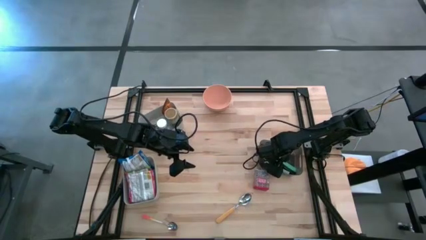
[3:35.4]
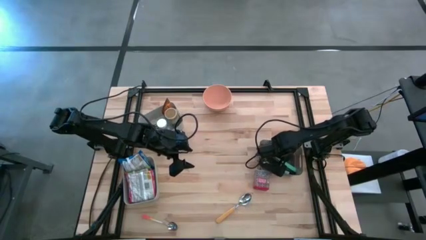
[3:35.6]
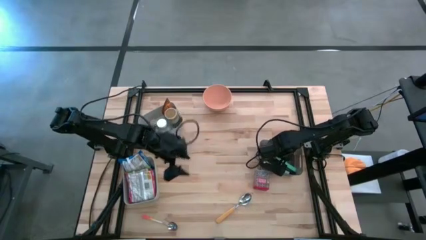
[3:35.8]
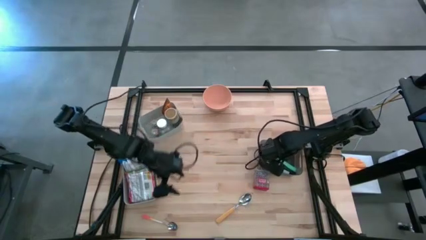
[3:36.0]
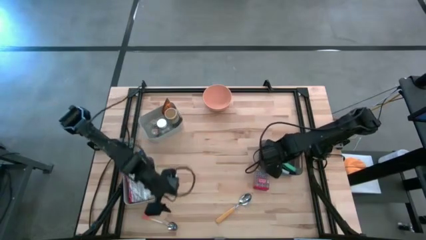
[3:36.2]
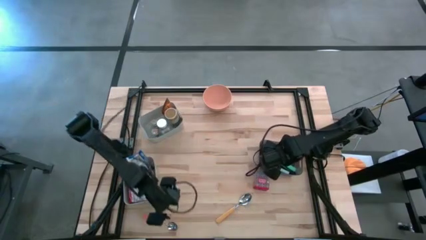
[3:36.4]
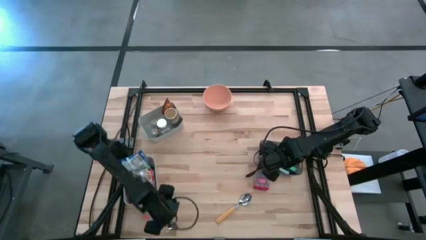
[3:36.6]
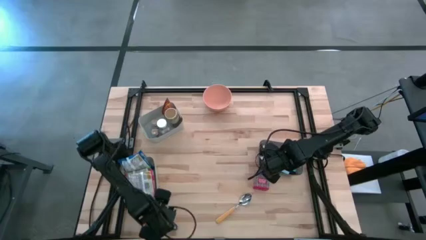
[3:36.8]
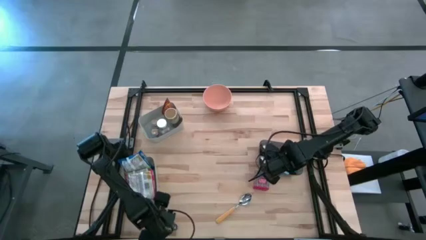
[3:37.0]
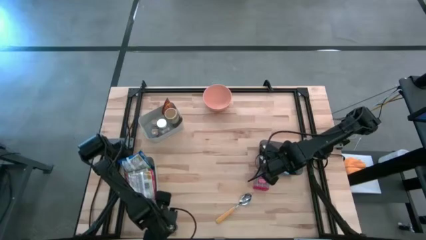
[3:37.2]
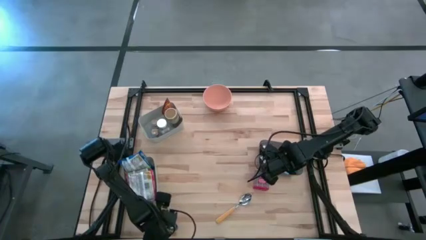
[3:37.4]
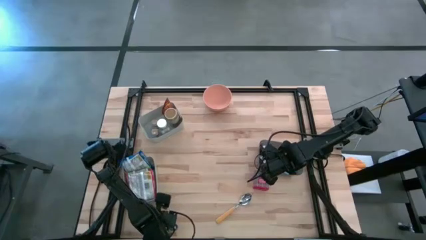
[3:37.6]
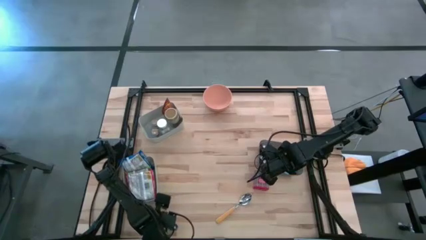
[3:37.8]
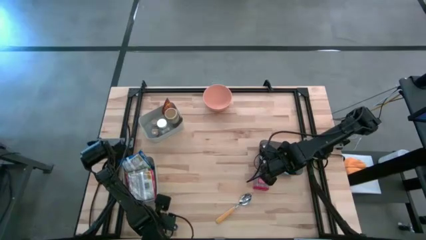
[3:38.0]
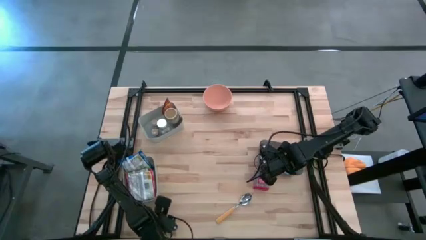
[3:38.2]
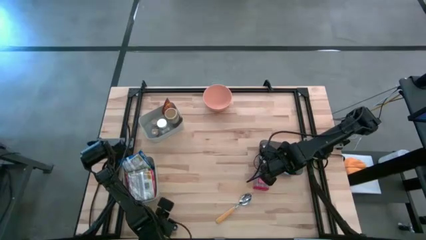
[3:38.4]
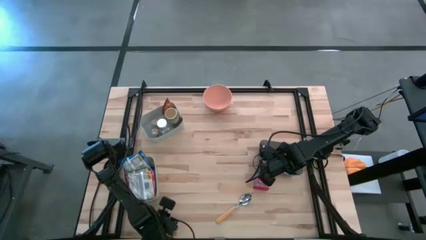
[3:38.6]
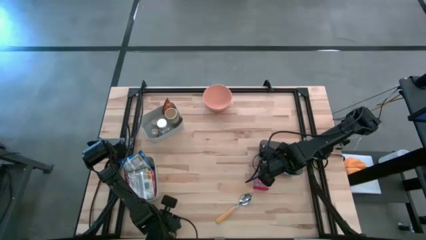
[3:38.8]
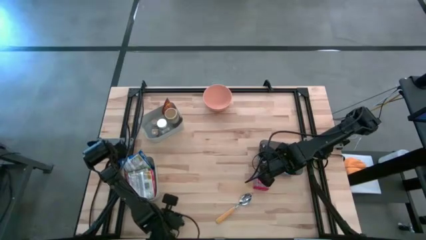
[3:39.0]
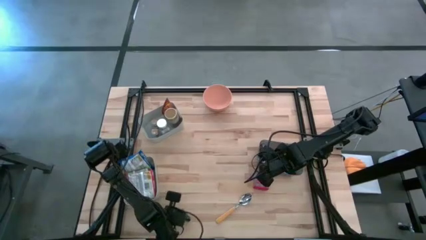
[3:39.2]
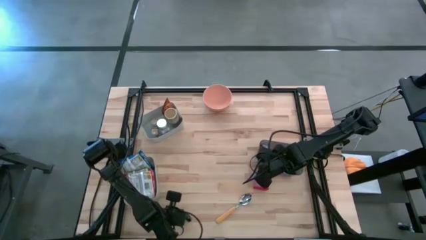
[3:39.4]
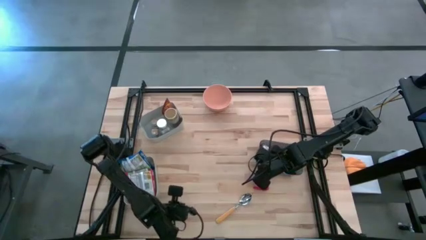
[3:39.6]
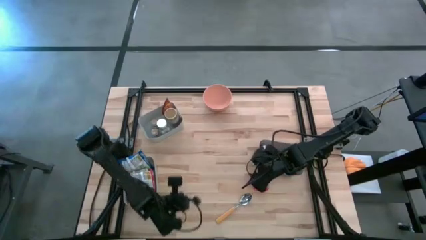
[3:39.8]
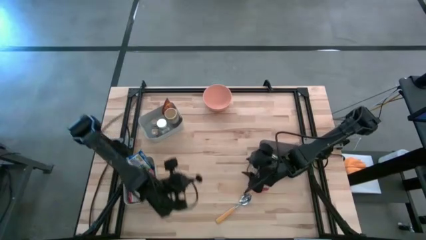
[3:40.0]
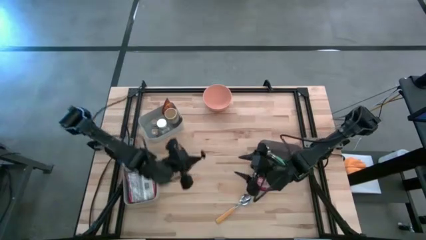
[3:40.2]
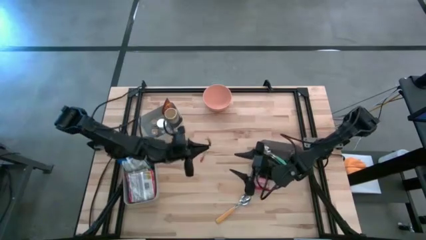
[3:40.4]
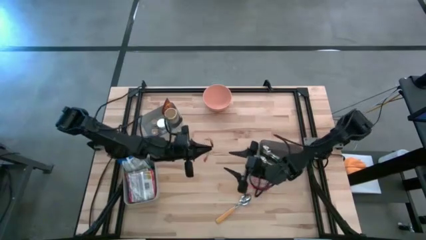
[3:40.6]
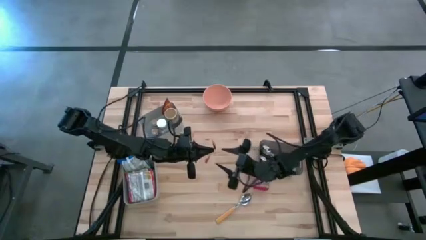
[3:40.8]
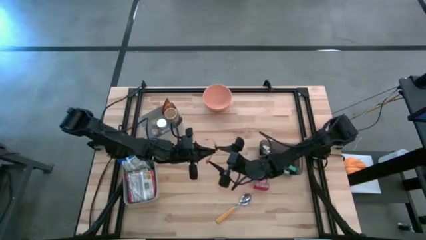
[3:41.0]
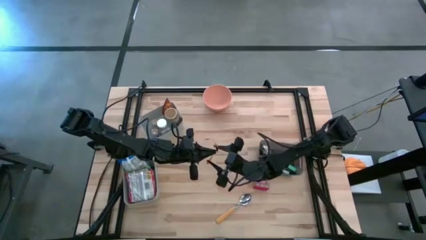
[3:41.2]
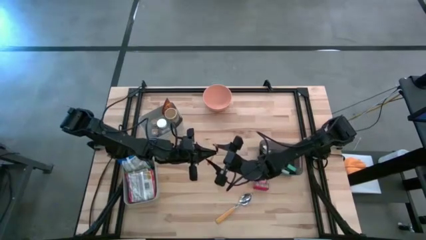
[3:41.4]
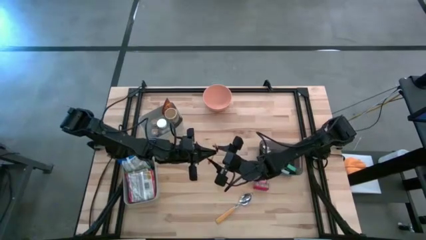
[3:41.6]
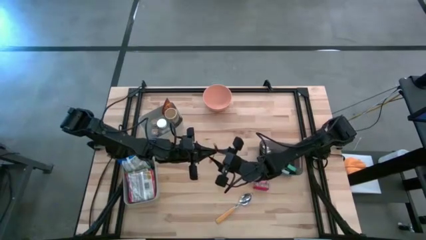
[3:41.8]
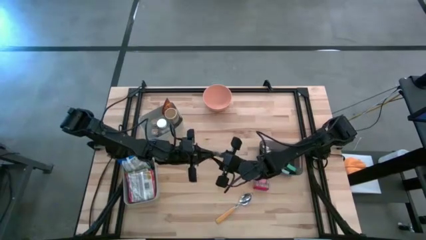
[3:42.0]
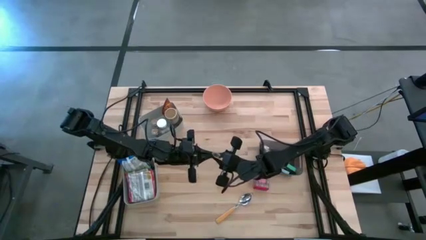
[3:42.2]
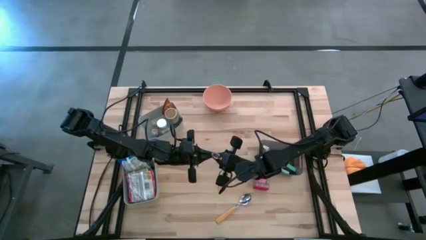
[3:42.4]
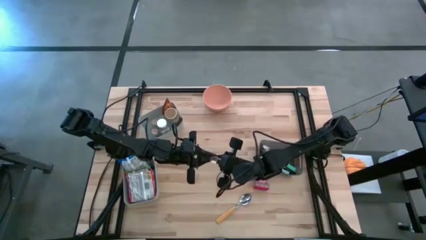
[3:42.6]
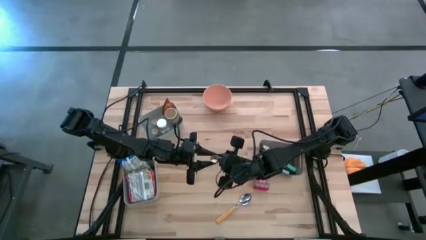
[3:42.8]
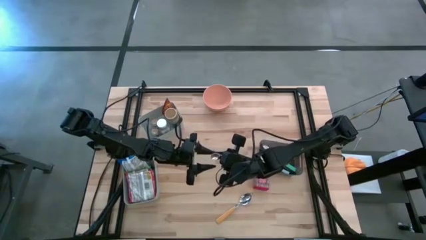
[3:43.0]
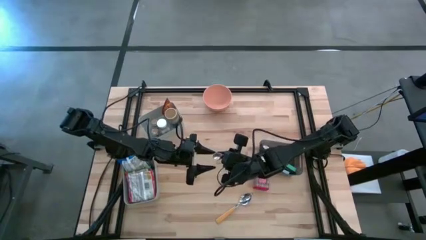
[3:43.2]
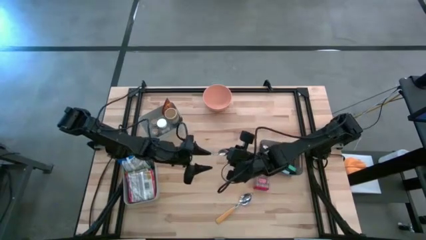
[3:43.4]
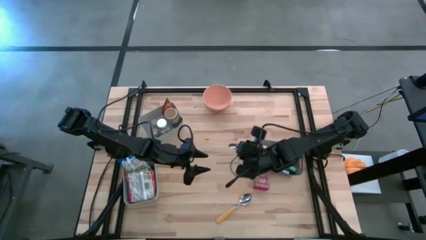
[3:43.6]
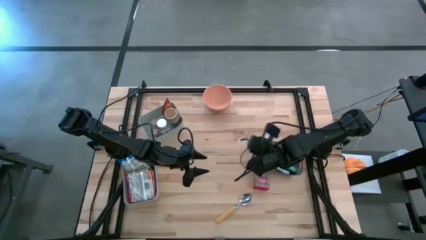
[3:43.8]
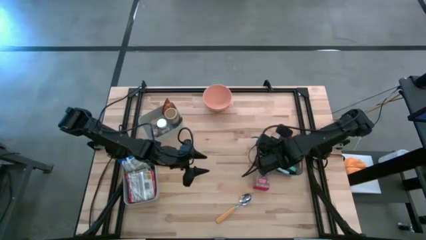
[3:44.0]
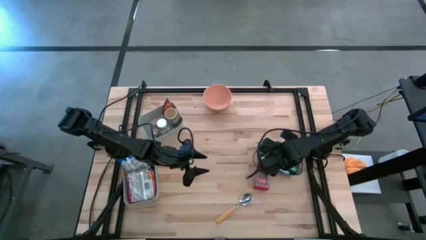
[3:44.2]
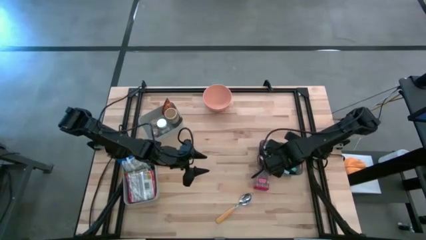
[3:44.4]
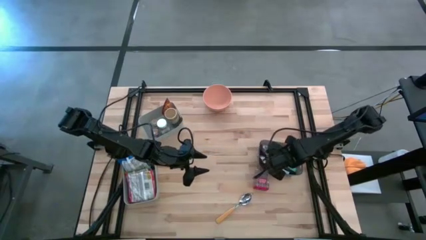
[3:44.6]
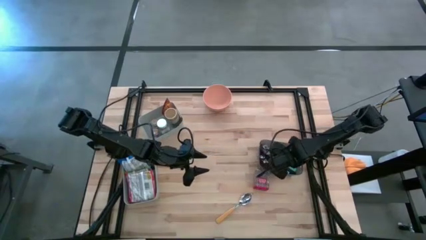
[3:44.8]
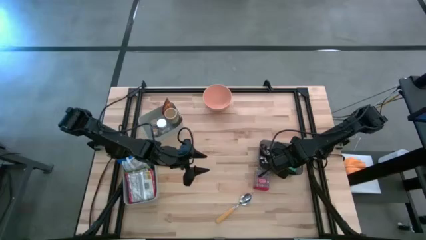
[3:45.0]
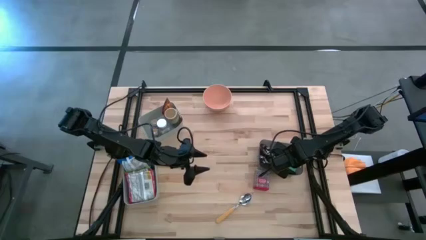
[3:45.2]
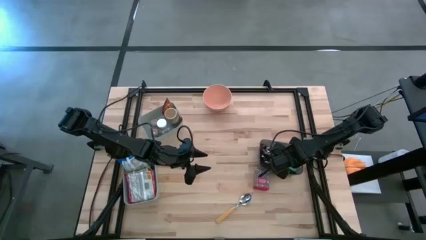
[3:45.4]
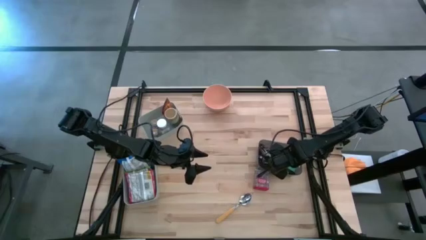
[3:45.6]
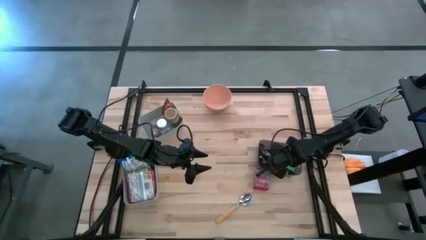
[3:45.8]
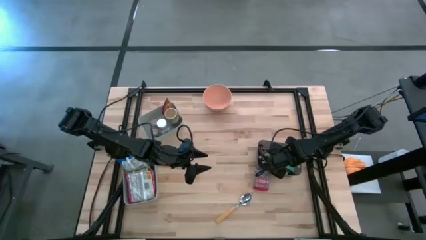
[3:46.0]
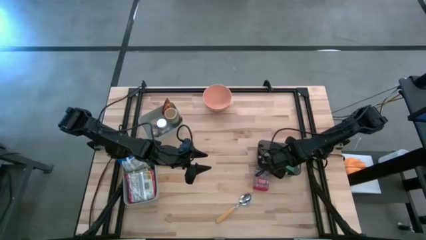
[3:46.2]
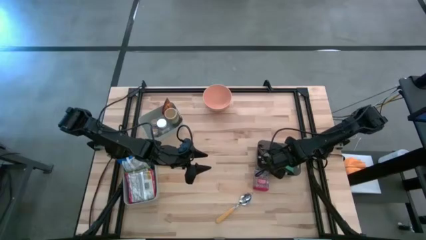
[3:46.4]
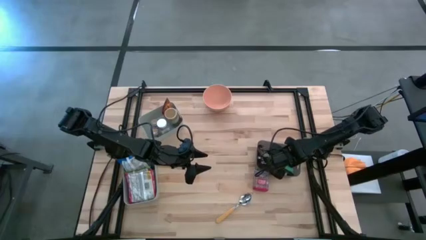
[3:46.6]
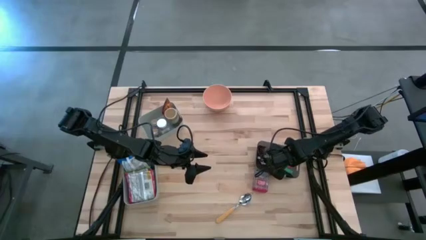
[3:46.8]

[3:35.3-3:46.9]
Put the white orange spoon into the black bin

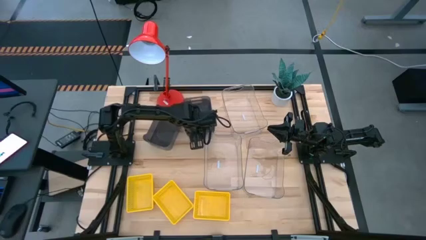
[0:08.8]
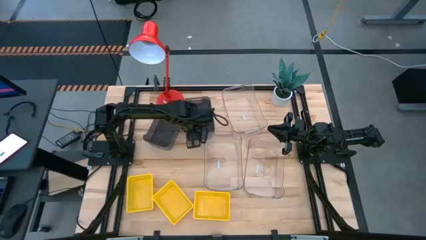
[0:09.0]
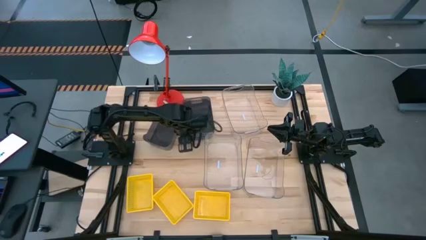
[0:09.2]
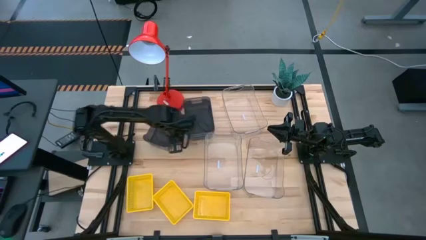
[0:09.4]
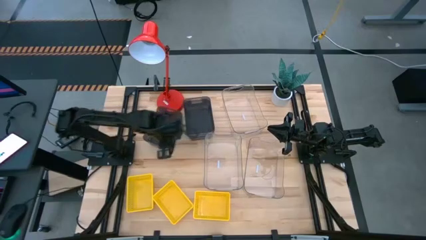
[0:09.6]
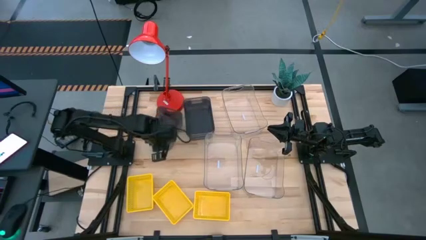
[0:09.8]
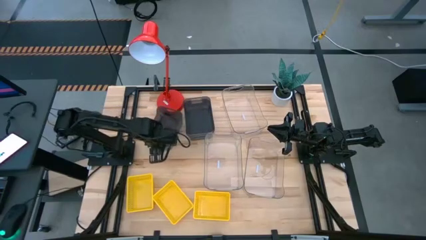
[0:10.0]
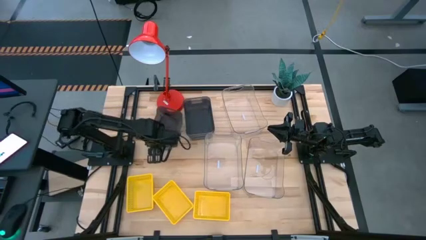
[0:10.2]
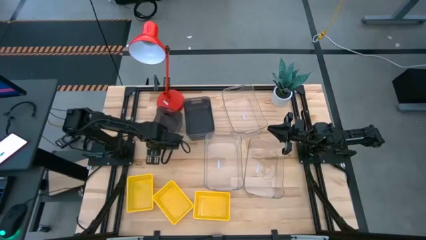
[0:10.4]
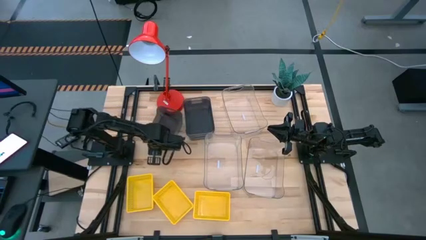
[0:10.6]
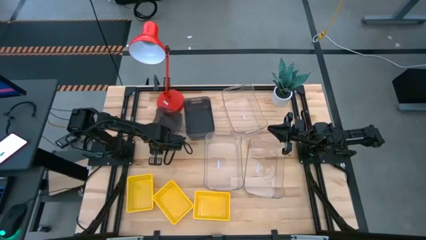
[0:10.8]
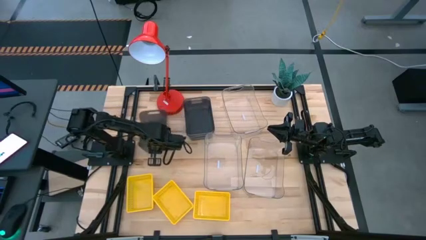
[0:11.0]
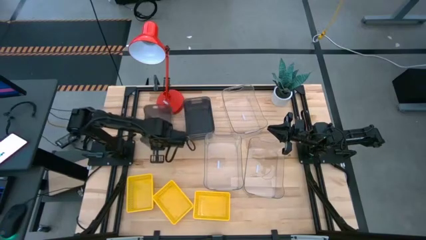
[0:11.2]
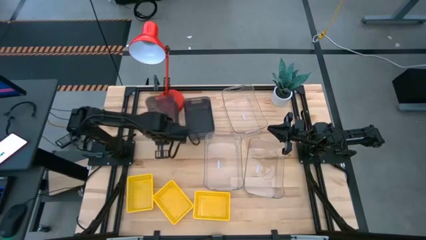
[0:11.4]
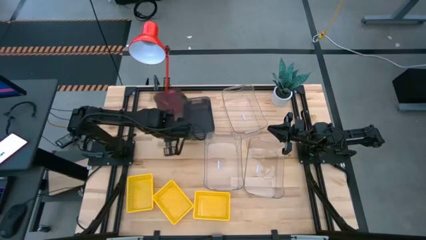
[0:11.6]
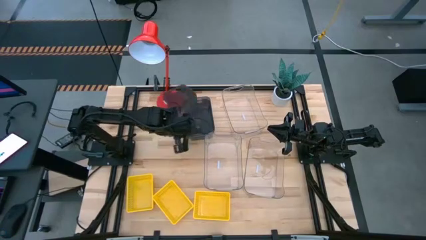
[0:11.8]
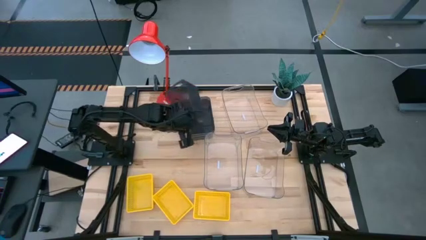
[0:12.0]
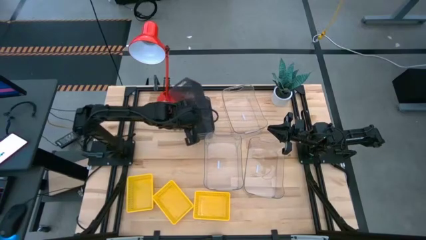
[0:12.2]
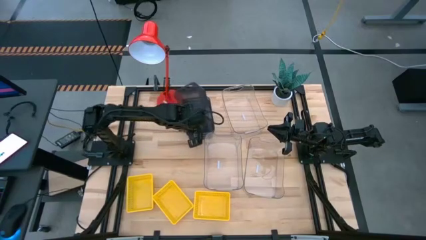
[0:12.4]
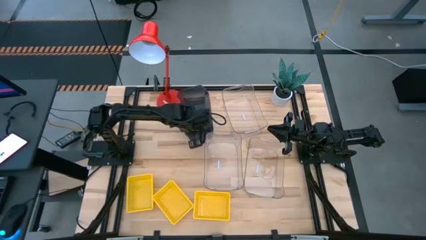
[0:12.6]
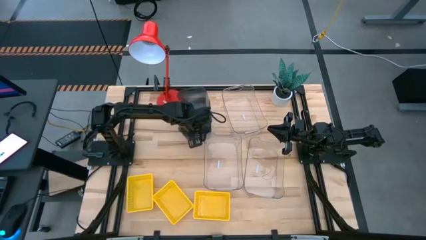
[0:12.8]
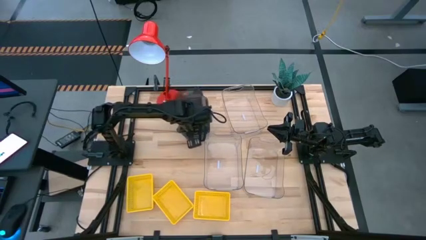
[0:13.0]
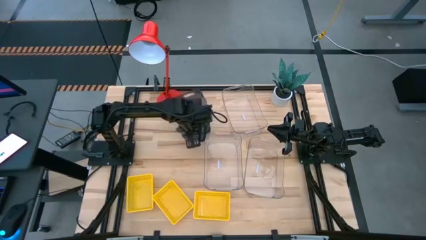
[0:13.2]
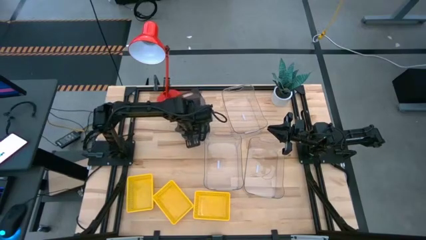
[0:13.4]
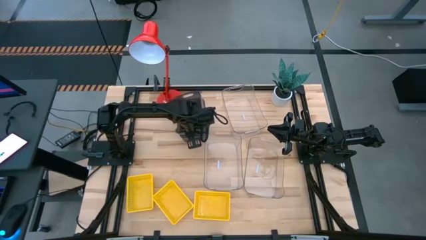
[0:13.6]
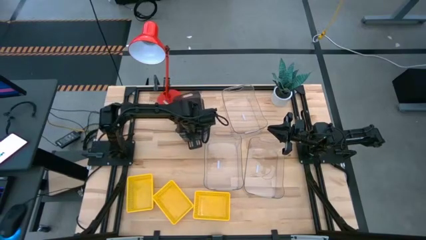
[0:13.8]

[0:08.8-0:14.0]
Stack the left black bin on top of the right black bin
